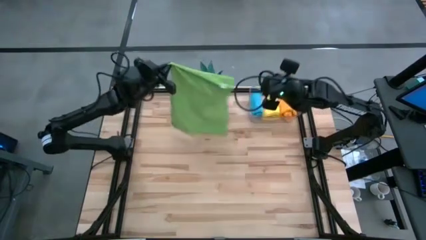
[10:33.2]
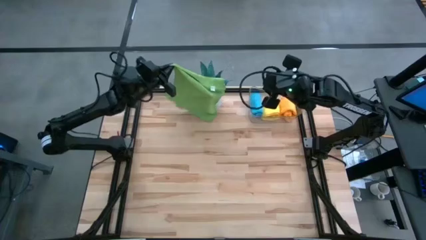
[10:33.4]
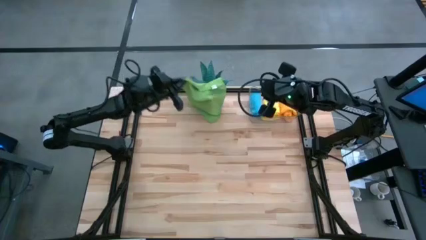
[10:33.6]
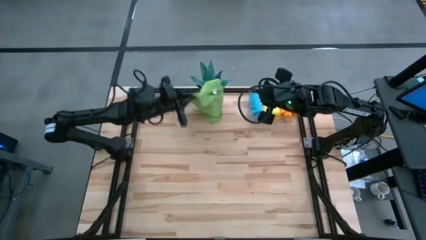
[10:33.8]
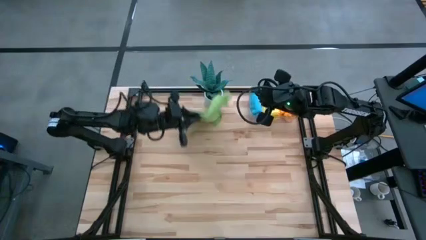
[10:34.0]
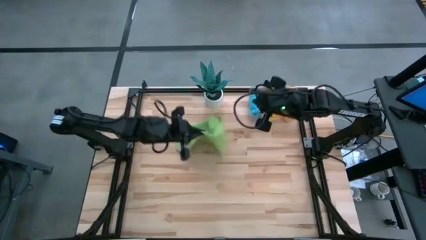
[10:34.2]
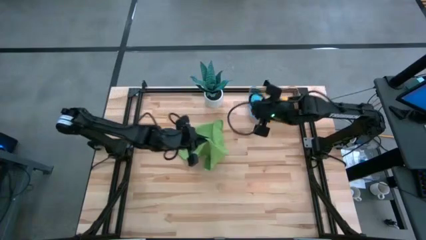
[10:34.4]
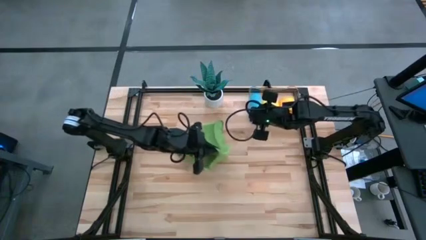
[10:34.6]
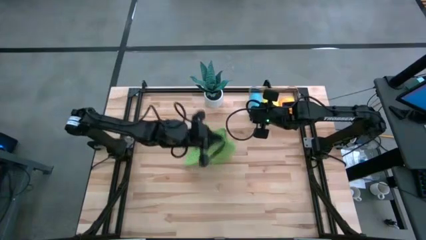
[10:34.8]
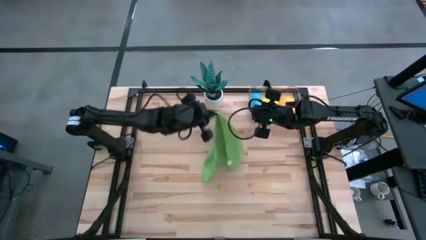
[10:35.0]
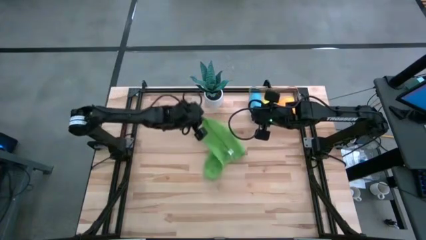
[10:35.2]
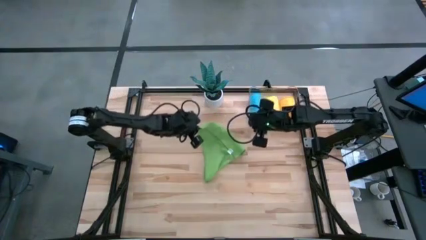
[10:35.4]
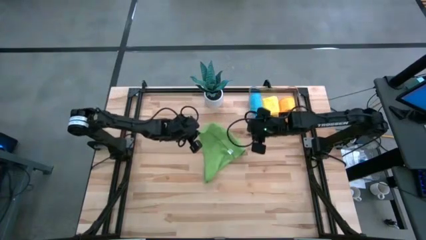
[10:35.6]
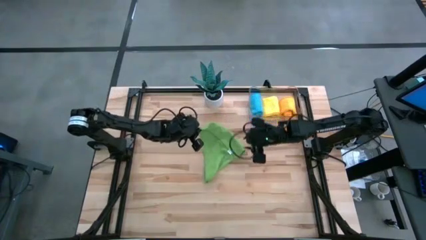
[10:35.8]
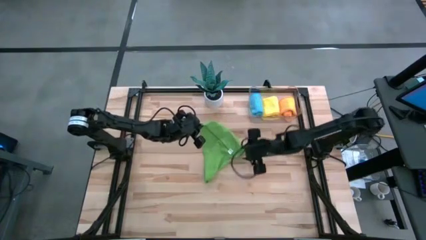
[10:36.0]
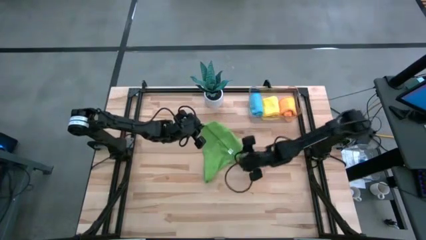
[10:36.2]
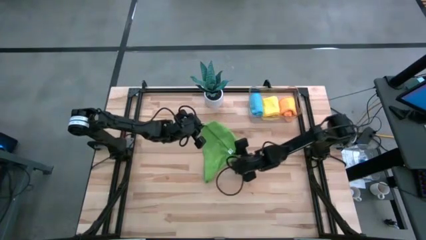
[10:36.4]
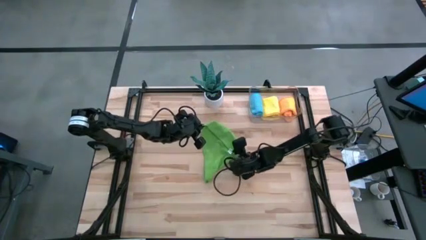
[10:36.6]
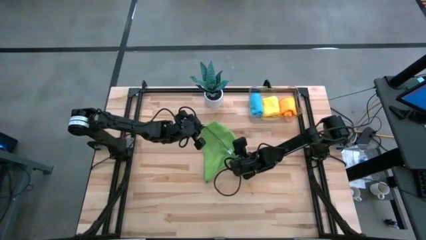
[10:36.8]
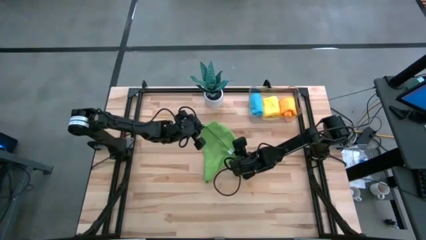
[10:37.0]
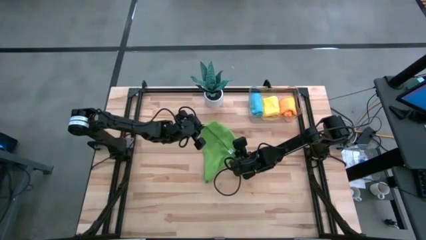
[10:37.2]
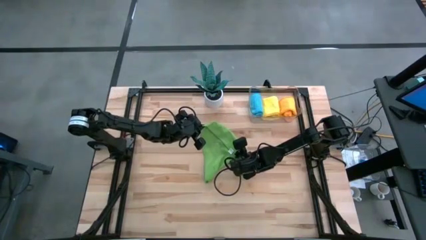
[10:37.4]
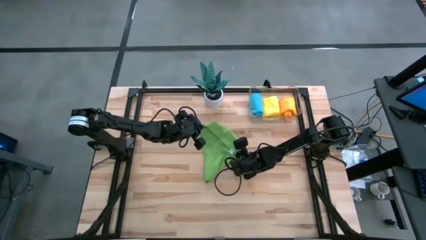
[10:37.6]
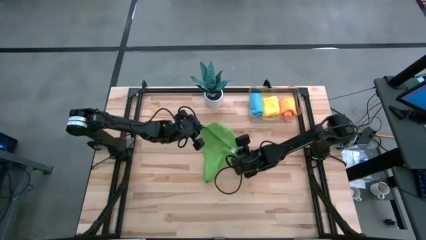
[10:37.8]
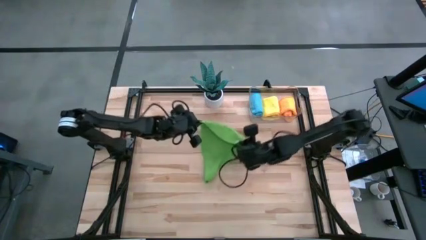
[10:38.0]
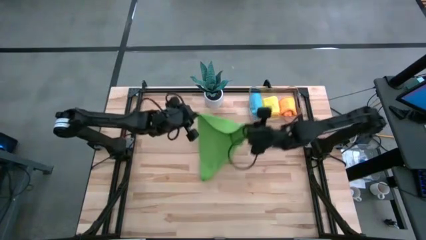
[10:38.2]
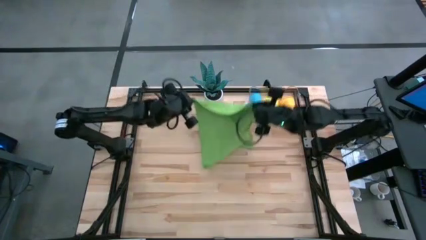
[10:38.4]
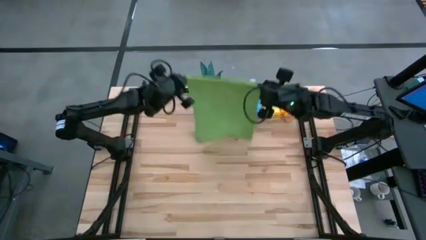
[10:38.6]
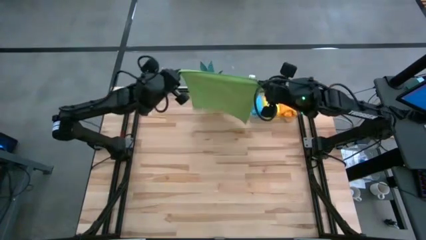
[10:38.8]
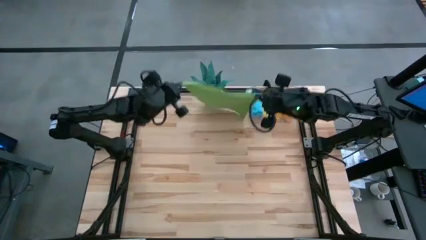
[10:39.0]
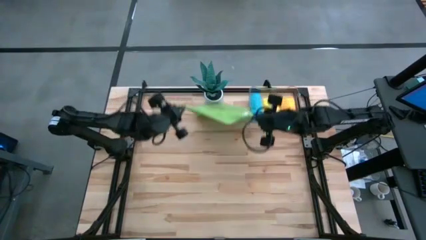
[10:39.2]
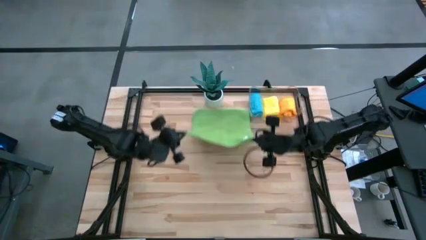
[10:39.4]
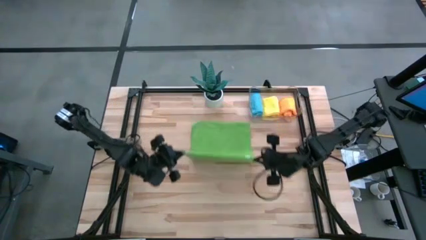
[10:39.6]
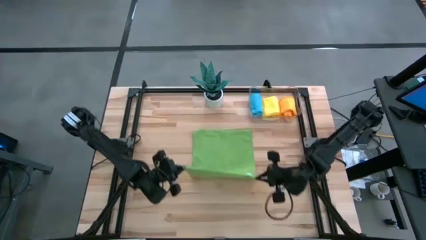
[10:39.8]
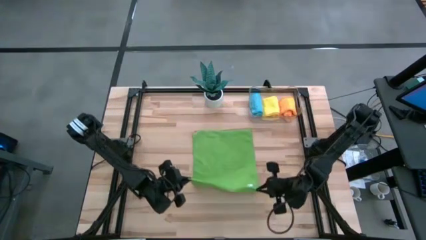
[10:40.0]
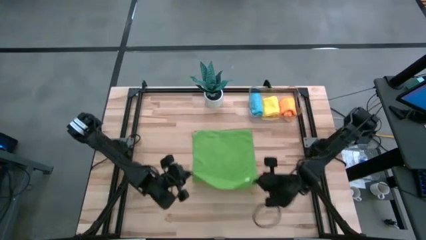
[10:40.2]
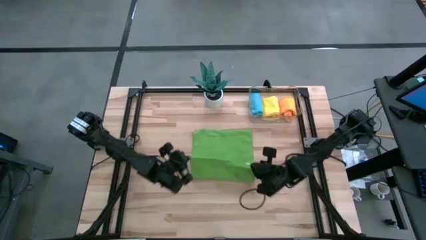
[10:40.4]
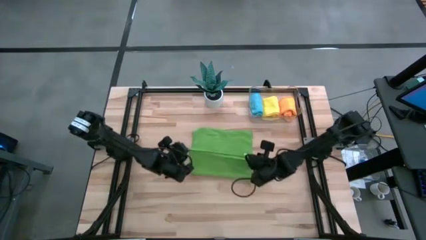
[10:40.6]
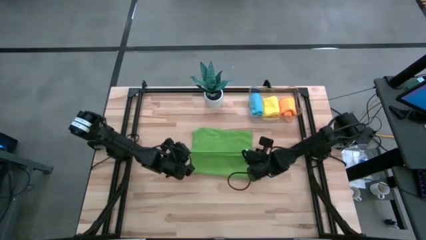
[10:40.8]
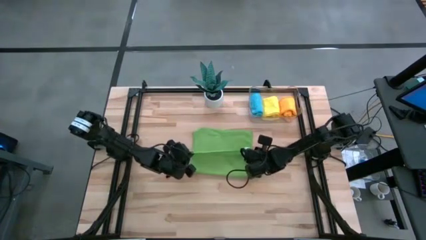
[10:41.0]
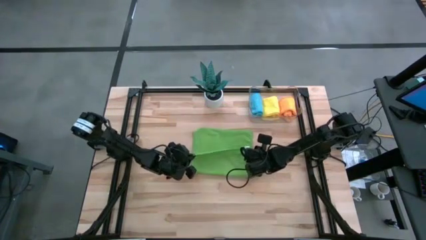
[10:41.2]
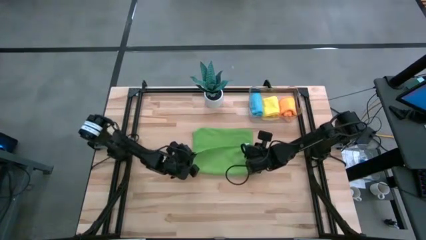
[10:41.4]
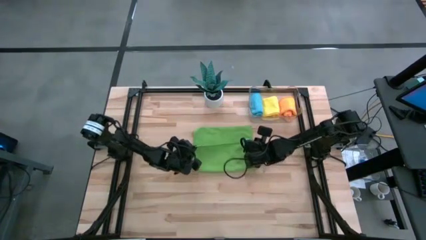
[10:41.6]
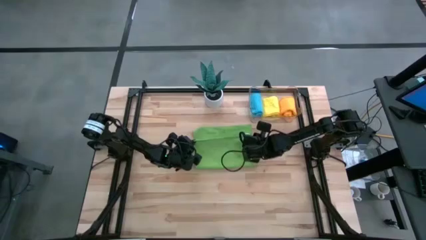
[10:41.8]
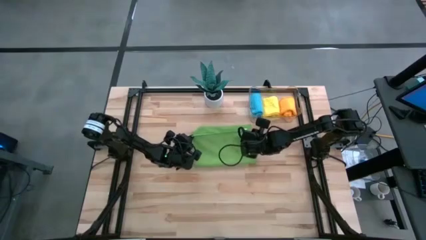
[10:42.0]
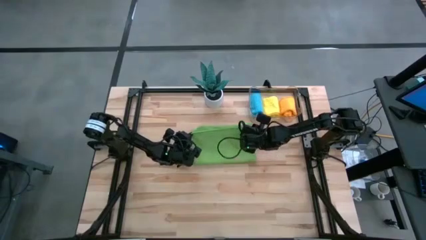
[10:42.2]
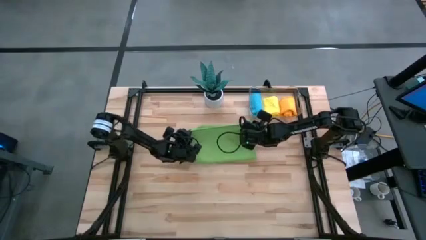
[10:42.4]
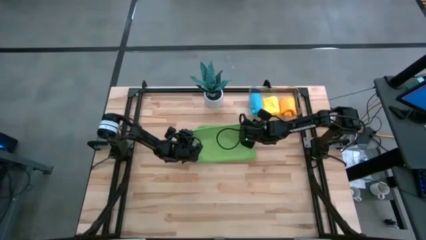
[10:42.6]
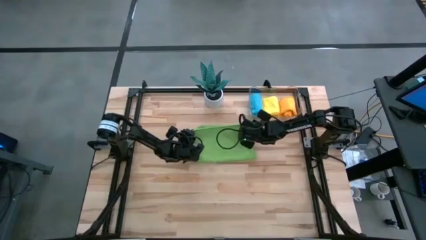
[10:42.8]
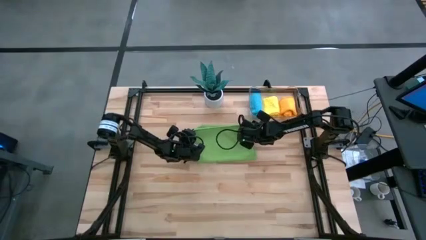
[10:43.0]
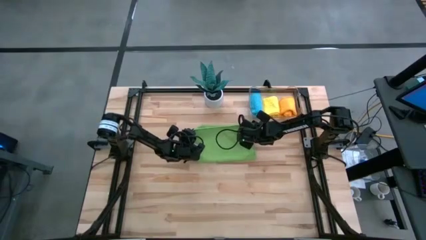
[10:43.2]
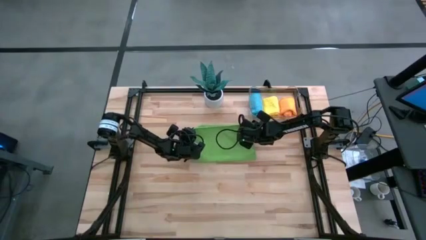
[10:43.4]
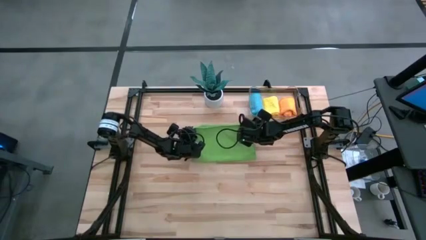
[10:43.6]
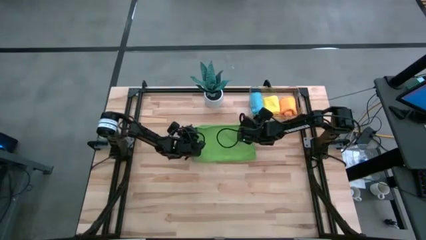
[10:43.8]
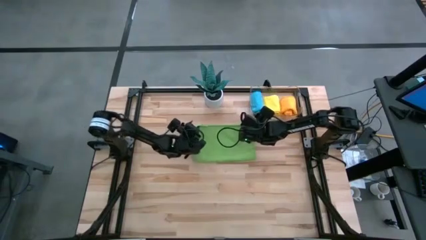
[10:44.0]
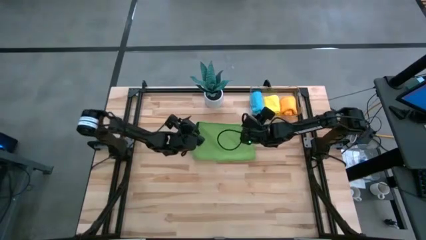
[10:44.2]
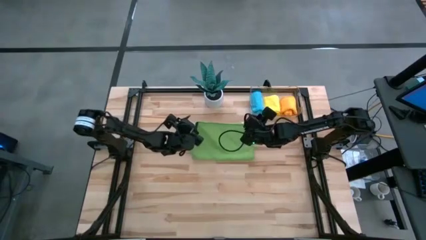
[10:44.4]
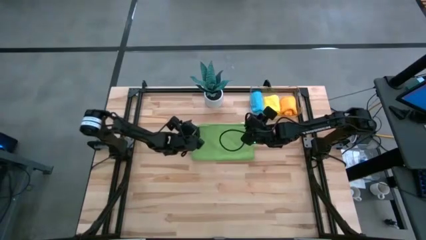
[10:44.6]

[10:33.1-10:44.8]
Task: Roll microfiber towels into tight, uniform cylinder then place into a basket
Fold the green microfiber cloth

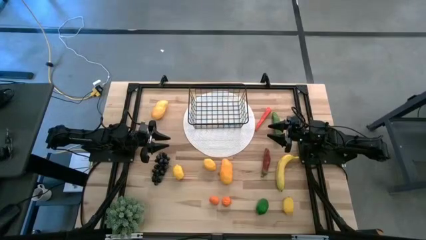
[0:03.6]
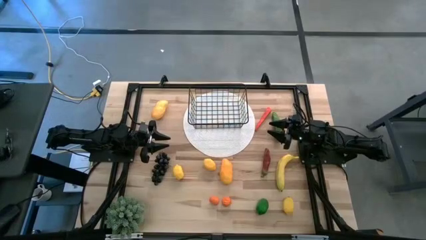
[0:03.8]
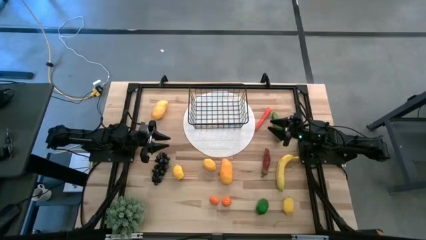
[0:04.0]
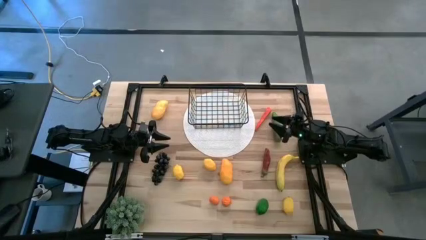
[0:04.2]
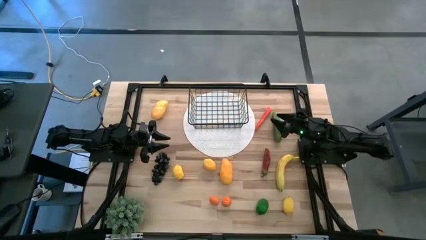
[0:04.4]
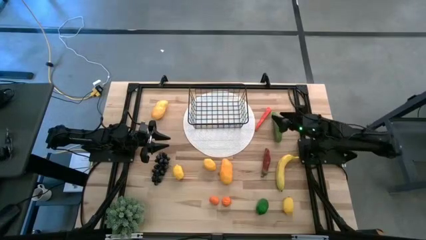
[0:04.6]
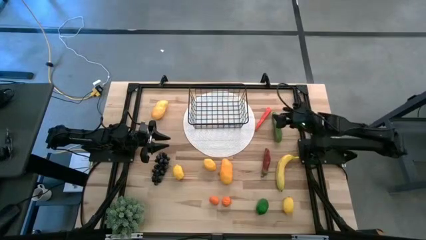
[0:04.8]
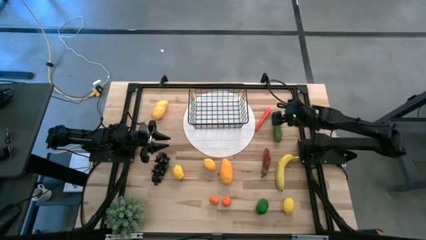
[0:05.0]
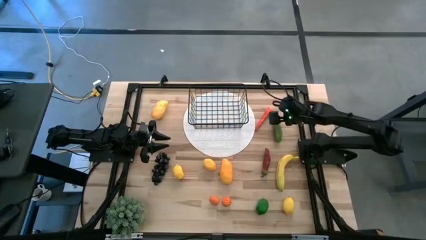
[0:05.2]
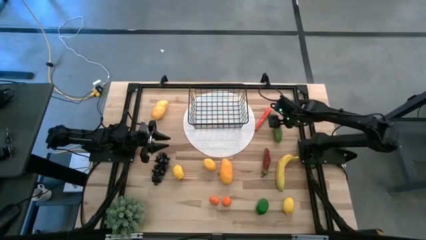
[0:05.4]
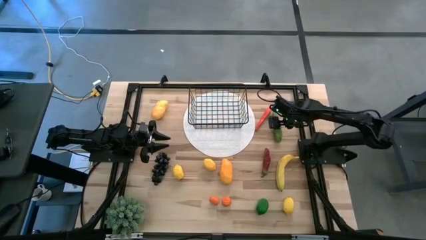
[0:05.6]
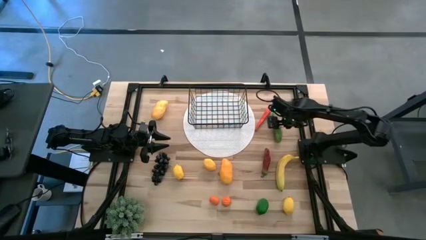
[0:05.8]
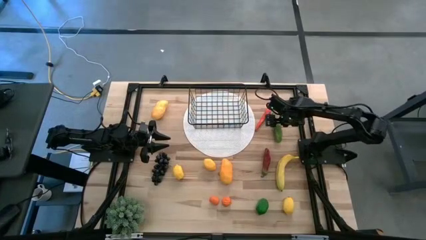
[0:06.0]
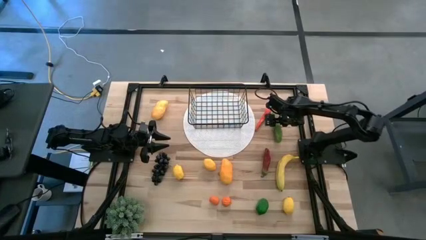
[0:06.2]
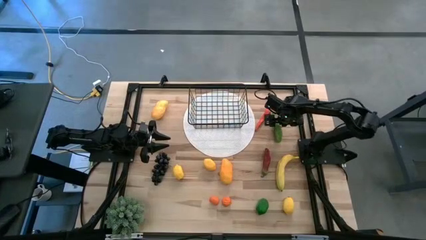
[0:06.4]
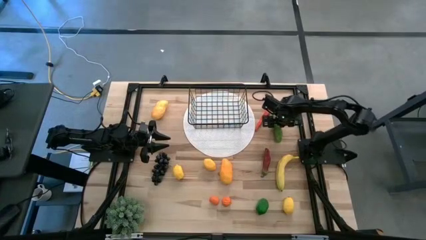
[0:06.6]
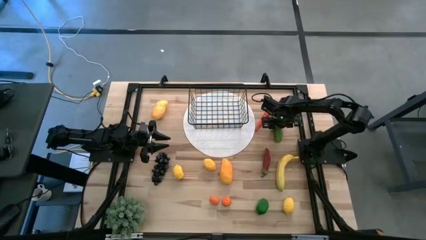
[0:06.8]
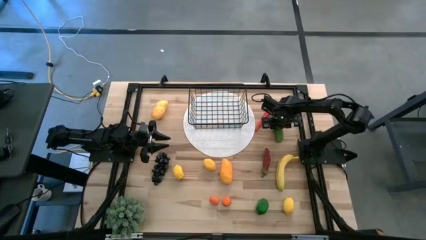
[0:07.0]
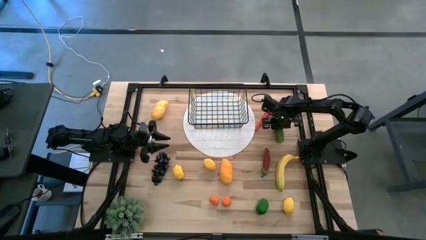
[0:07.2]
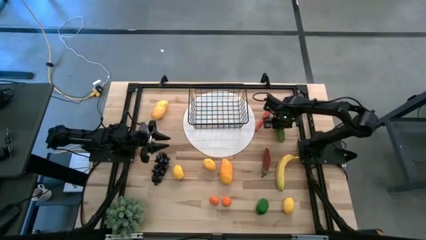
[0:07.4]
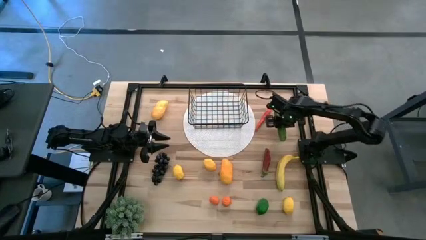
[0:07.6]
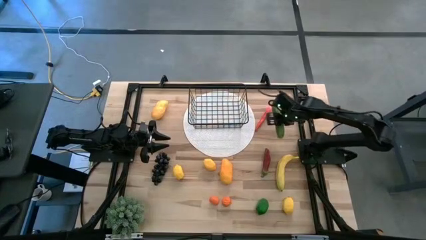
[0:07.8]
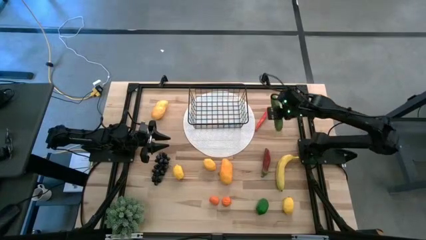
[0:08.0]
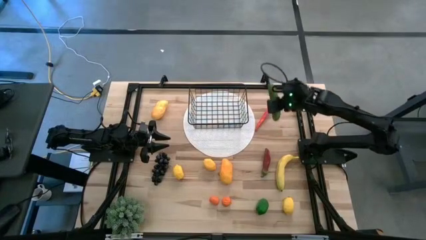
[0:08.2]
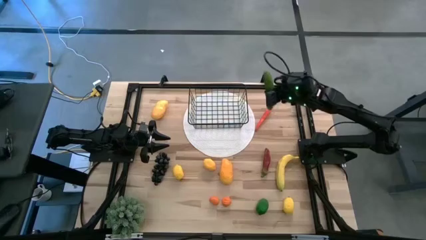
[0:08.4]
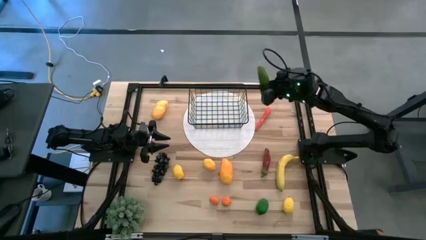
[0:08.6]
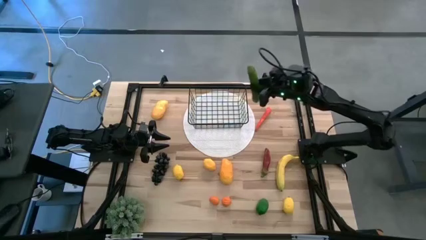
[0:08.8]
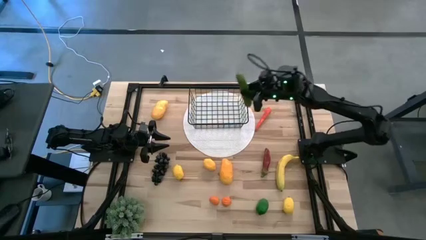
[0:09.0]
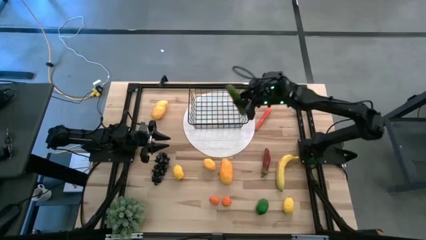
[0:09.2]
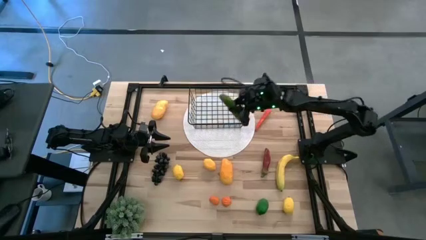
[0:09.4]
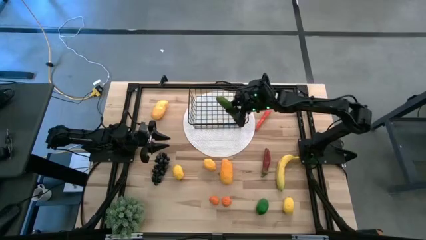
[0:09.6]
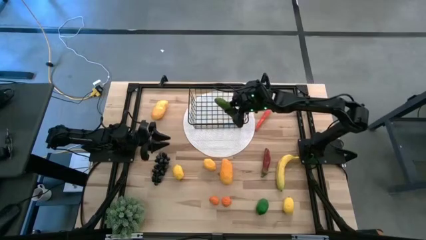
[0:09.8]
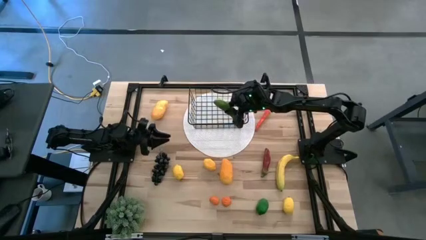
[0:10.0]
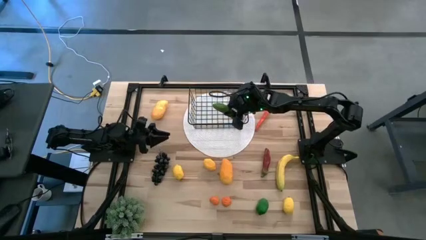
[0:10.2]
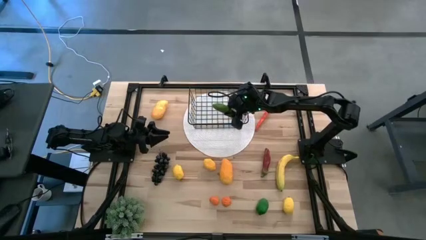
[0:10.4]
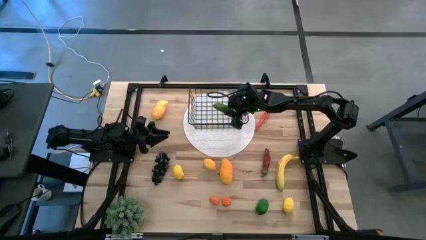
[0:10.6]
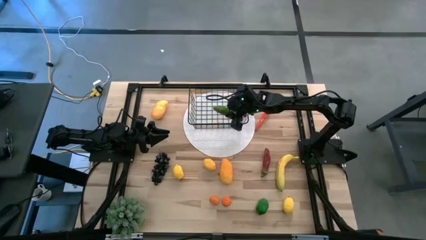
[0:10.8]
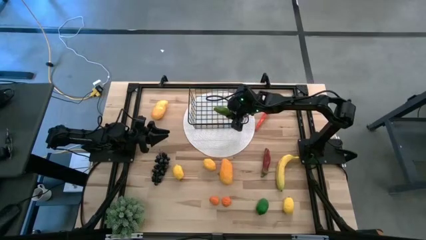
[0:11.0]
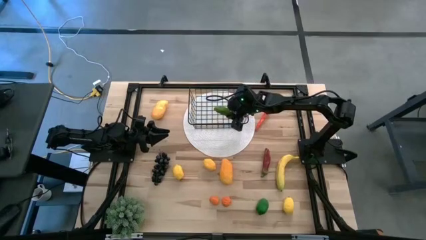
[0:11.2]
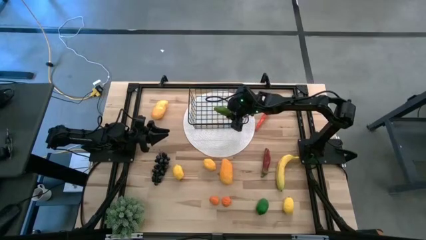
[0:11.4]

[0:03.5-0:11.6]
Task: Build produce basket
Put the cucumber into the black basket
